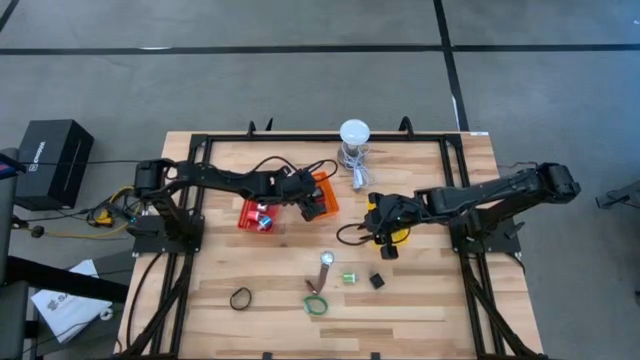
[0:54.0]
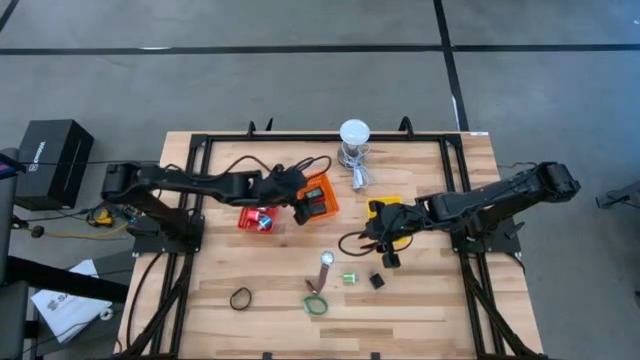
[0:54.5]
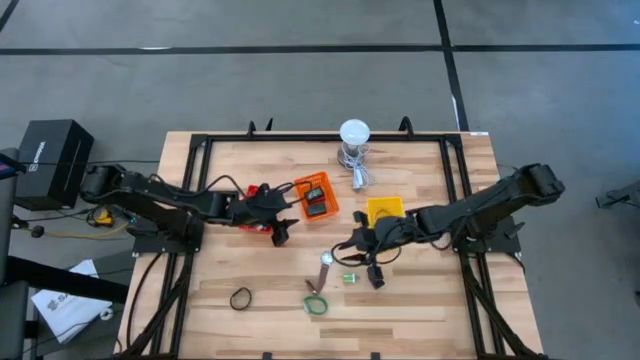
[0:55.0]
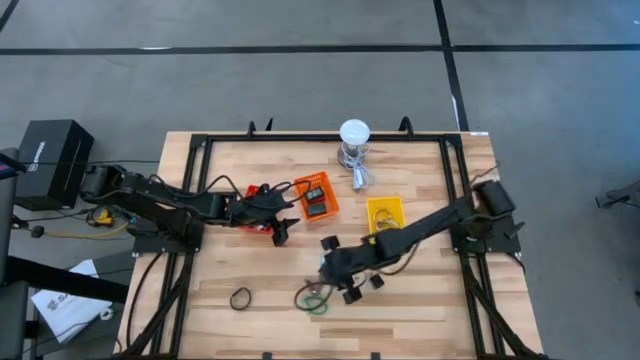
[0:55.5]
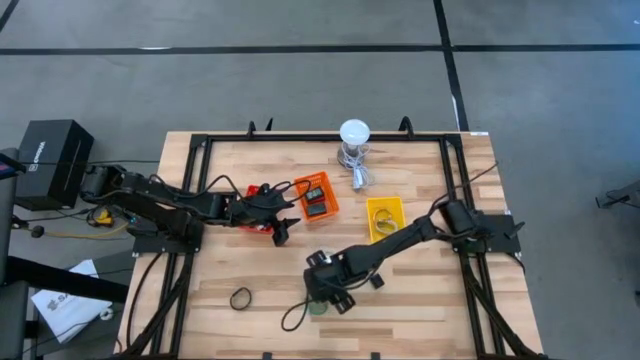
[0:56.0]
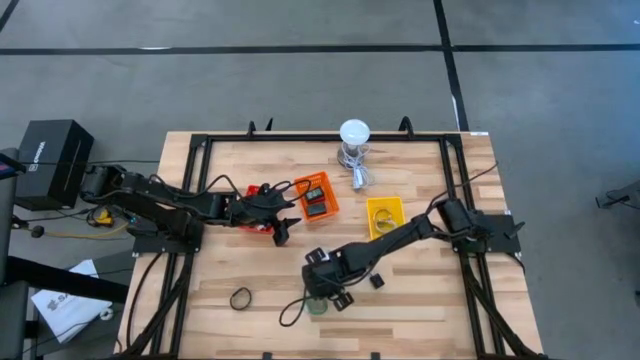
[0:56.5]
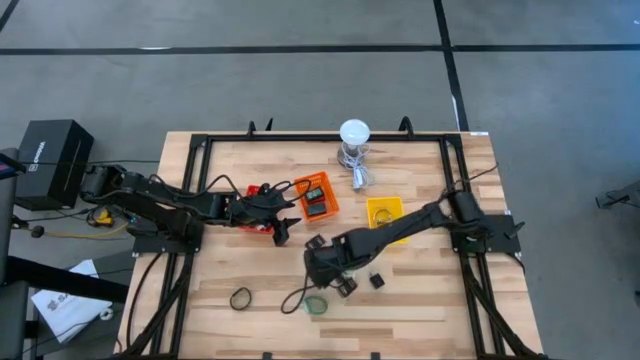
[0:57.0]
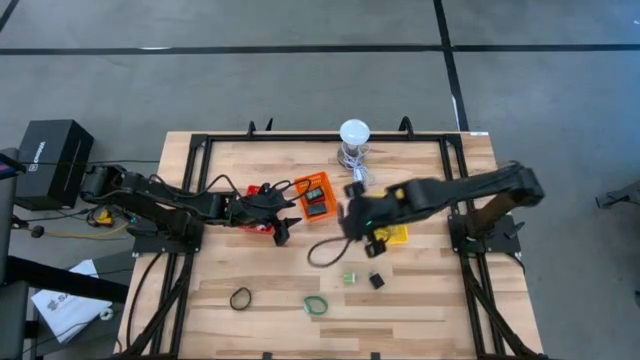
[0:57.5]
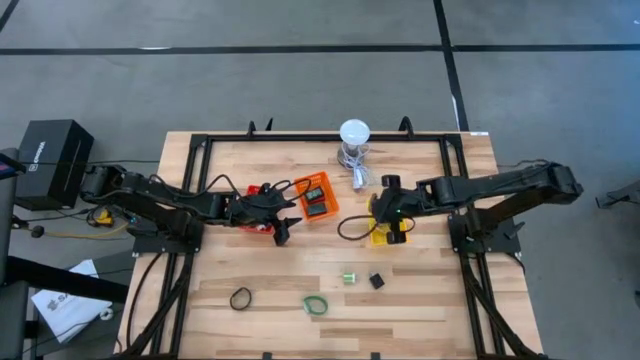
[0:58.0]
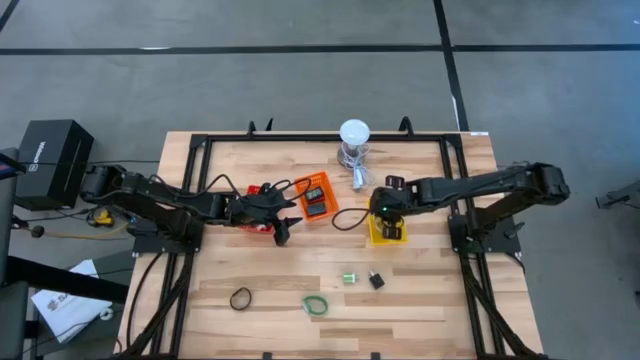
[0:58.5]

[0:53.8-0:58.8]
Task: Pick & Place Office items
Put the brown wrist watch into the yellow bin

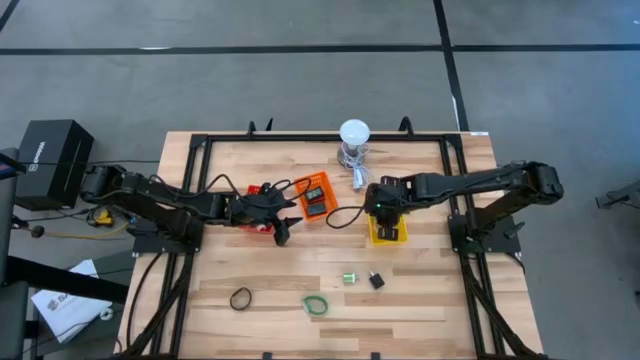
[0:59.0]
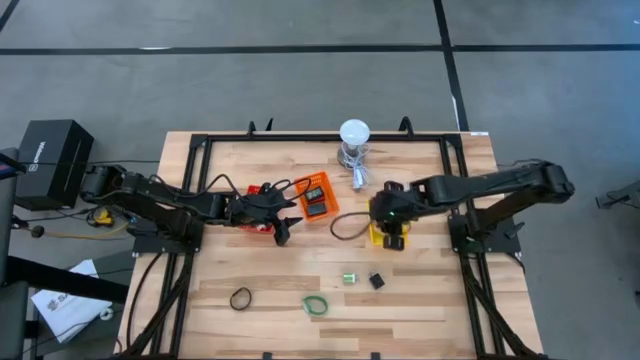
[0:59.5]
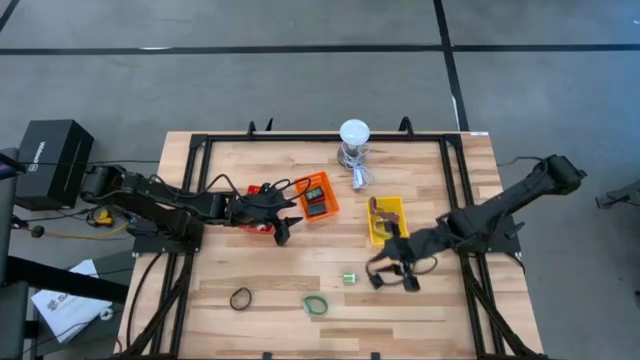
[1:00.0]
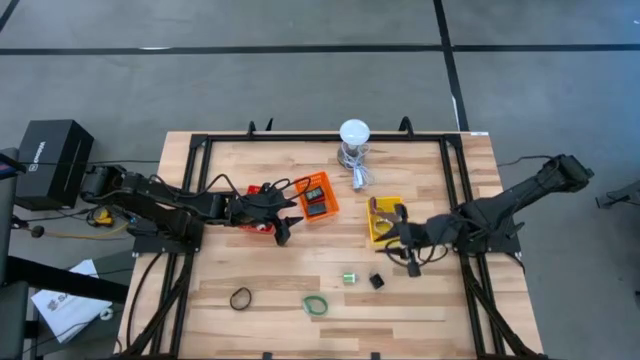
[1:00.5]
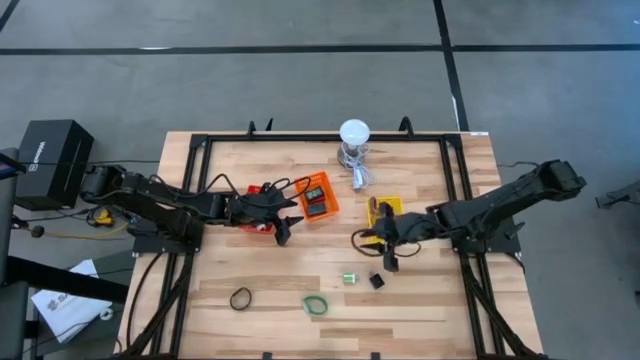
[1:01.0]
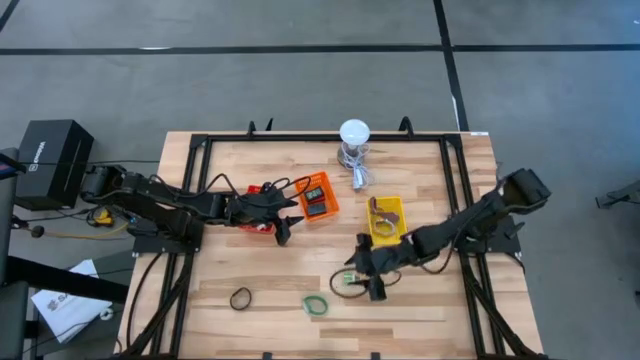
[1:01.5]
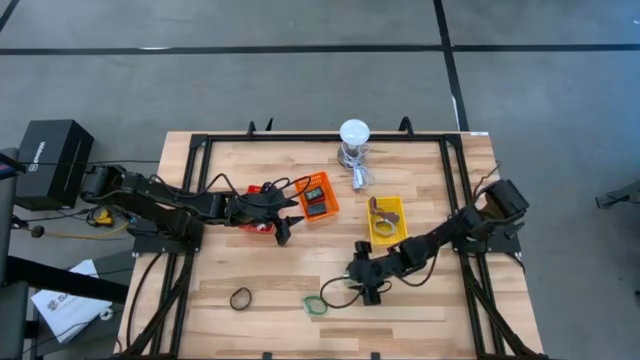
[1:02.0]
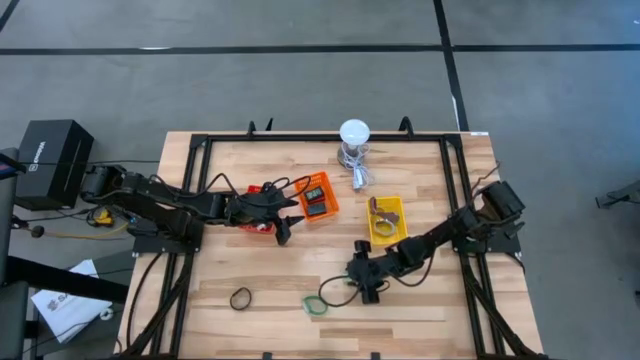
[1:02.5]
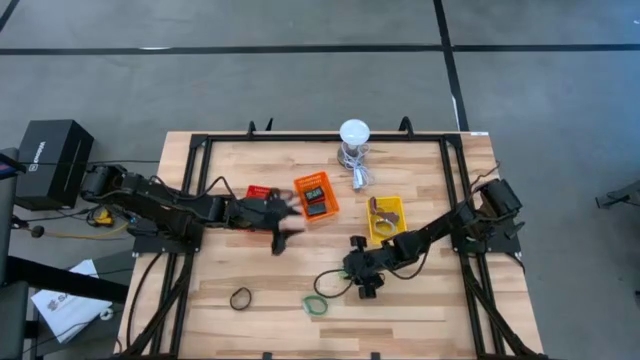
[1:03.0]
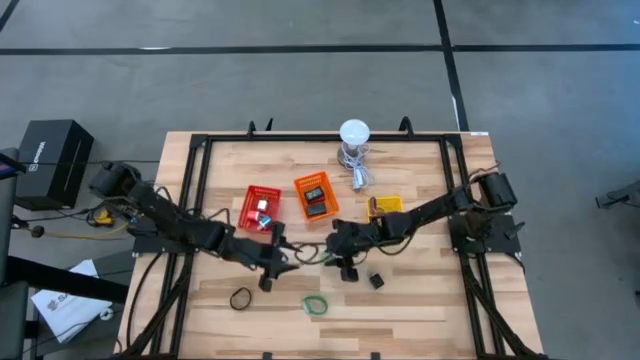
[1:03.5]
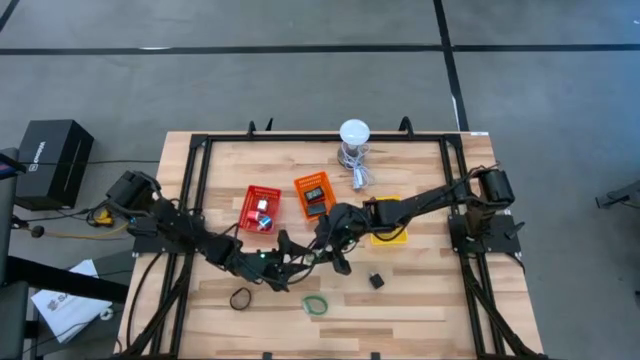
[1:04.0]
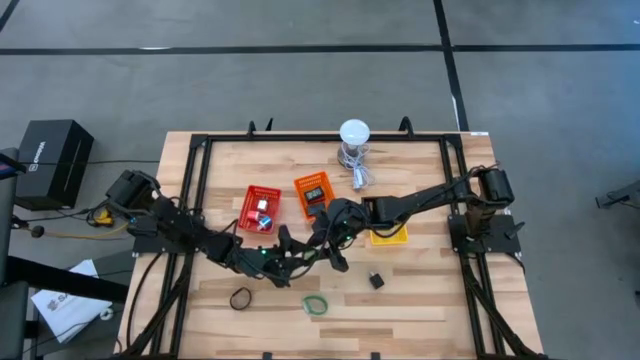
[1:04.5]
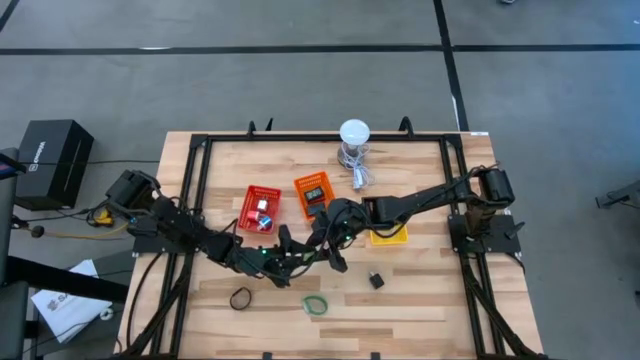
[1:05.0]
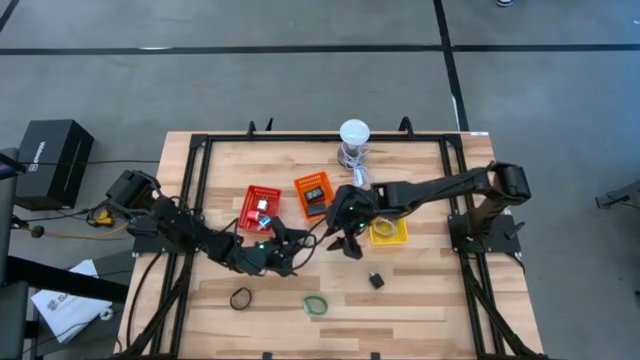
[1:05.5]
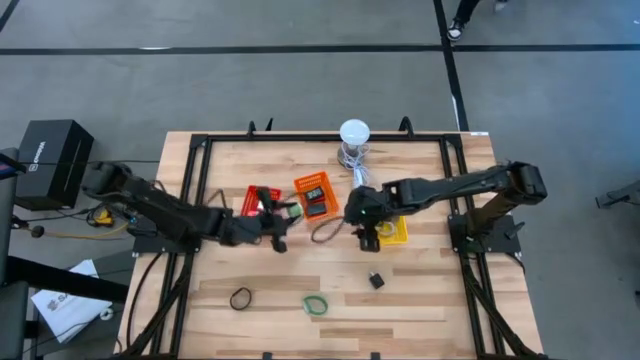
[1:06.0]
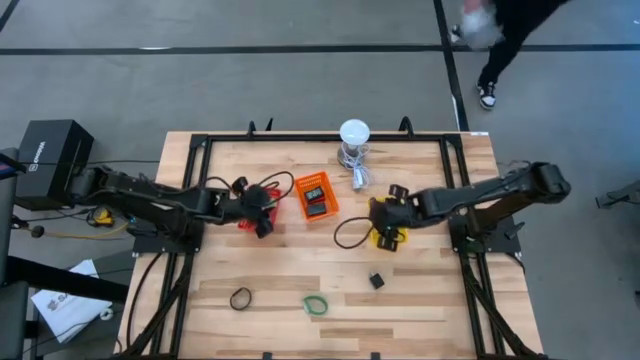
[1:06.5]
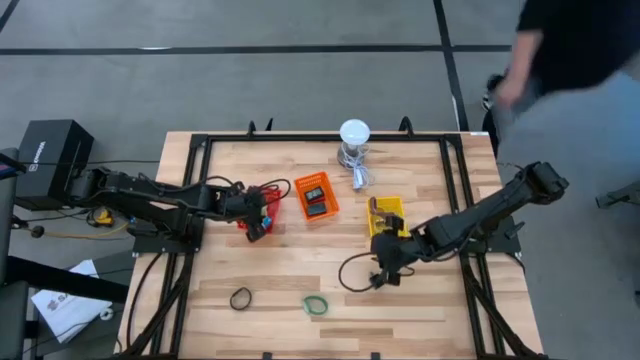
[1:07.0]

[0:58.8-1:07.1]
Put the green charger adapter into the red bin

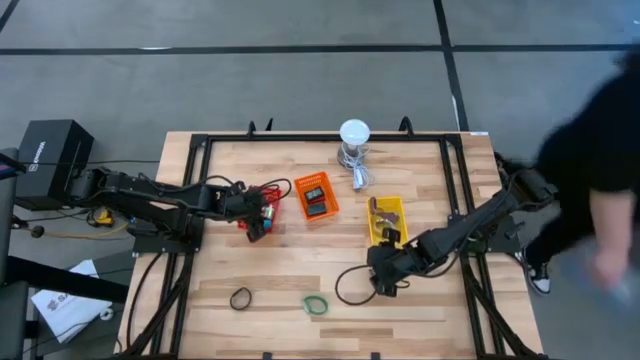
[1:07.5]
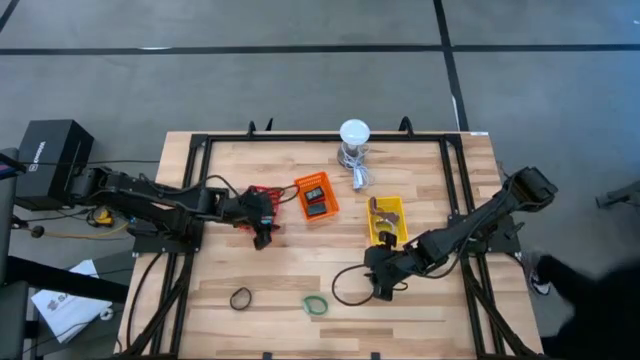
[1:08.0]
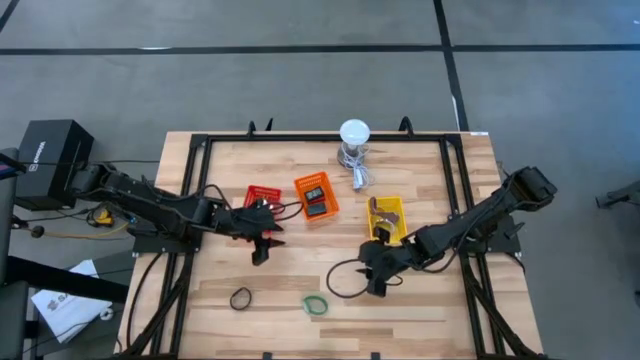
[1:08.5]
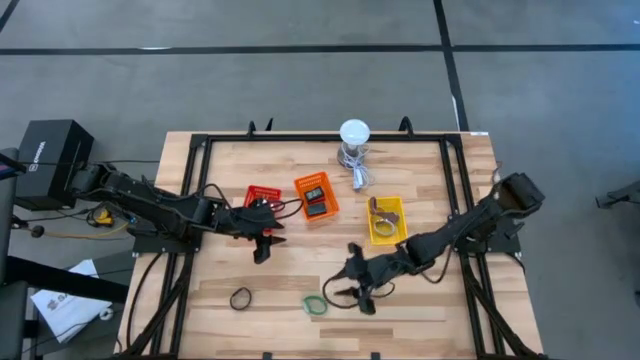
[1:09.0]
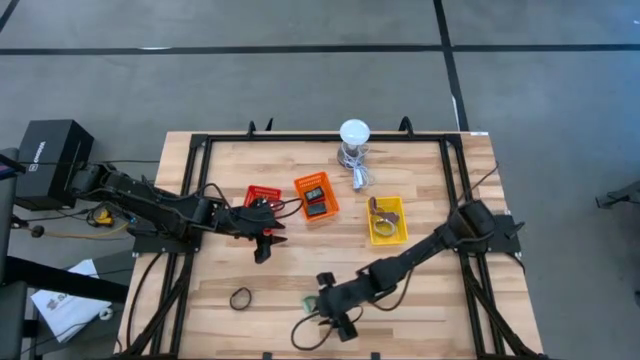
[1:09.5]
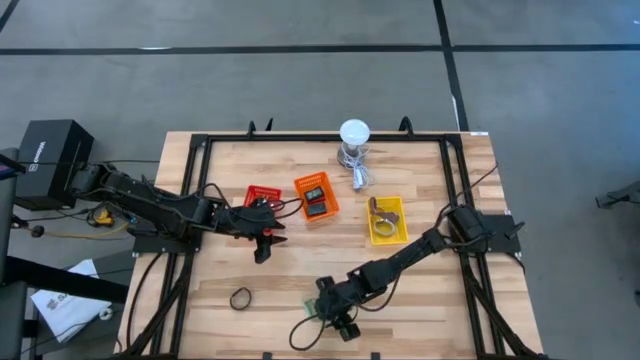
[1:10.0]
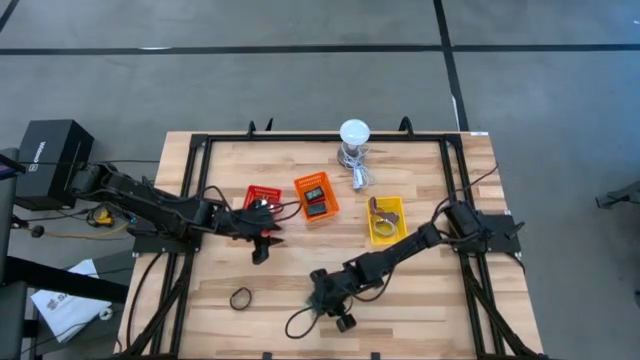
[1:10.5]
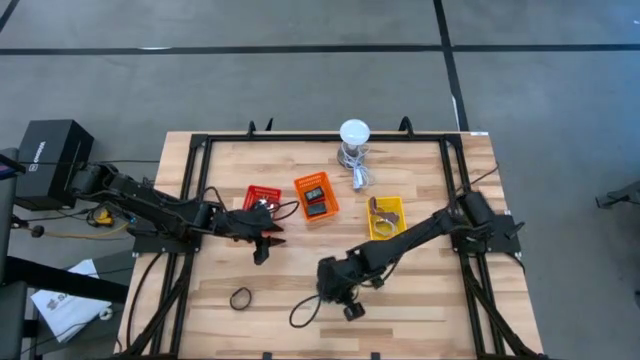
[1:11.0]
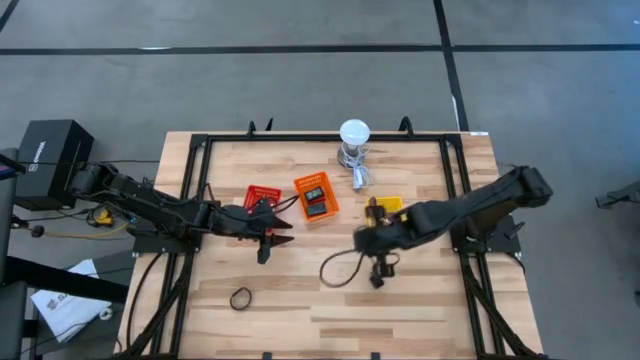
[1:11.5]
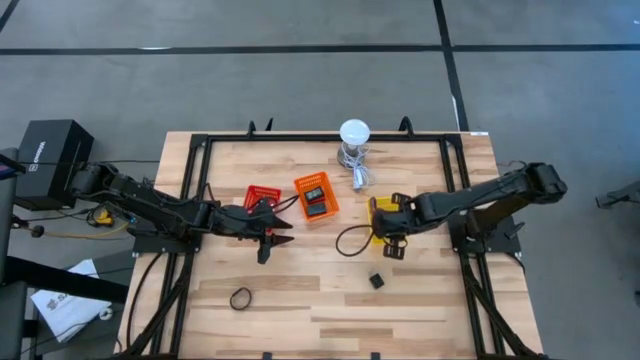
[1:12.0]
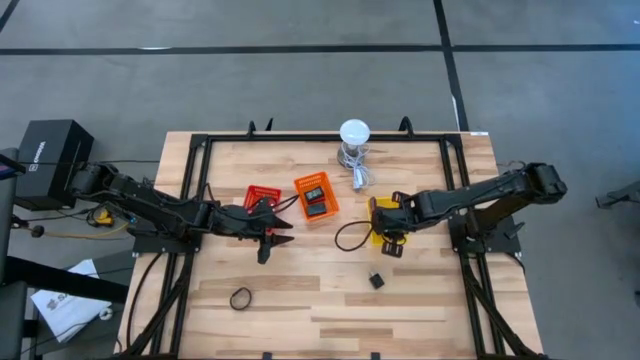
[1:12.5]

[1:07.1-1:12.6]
Put the green wrist watch into the yellow bin

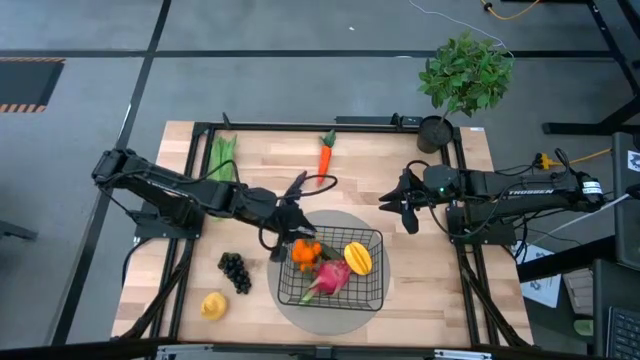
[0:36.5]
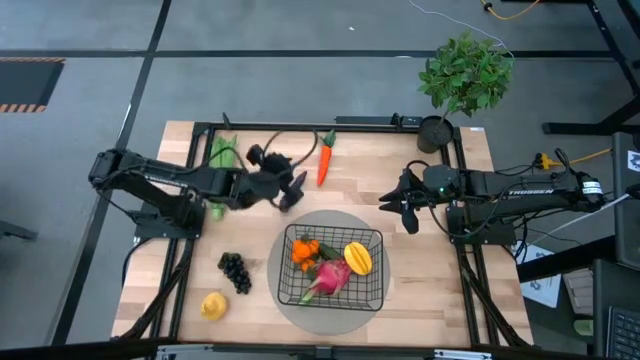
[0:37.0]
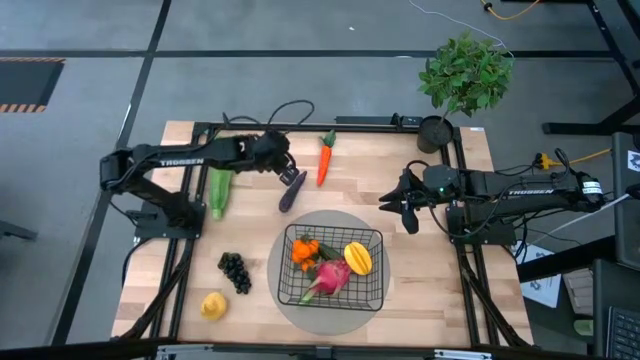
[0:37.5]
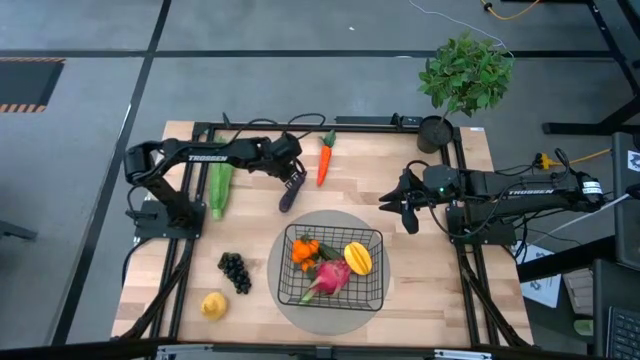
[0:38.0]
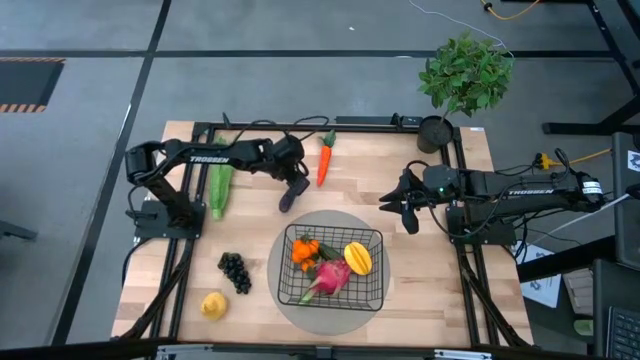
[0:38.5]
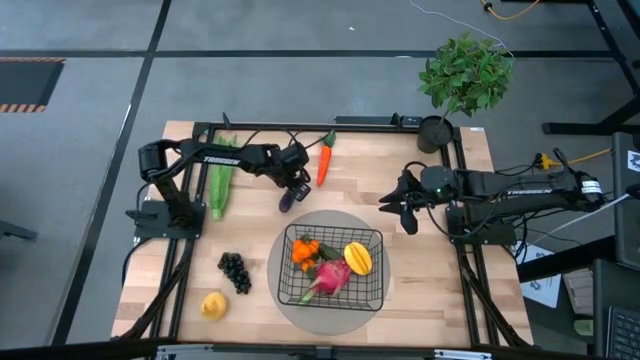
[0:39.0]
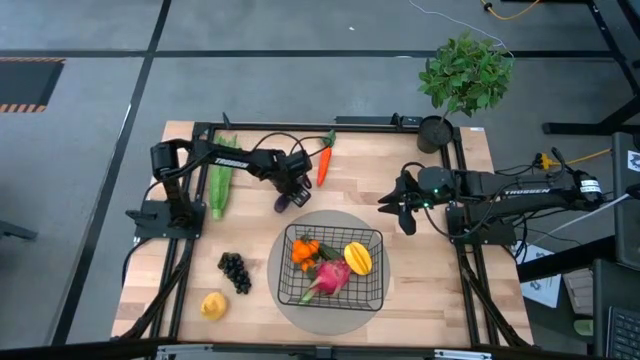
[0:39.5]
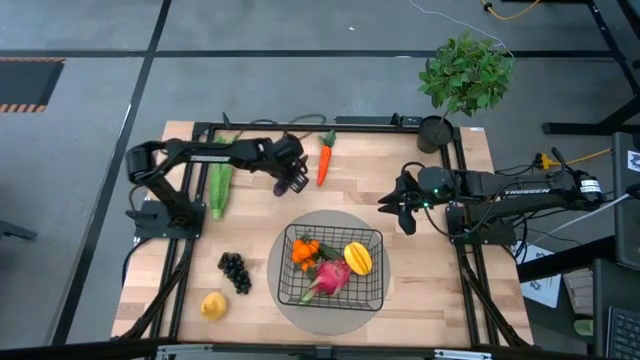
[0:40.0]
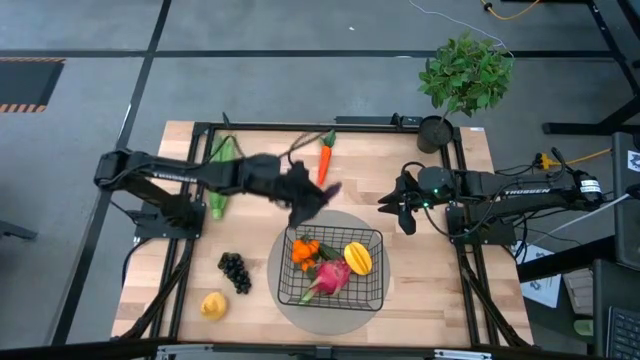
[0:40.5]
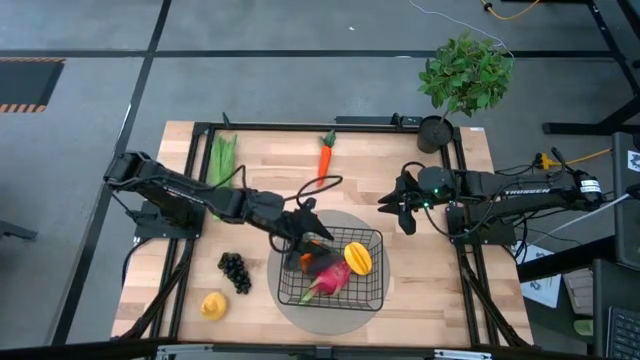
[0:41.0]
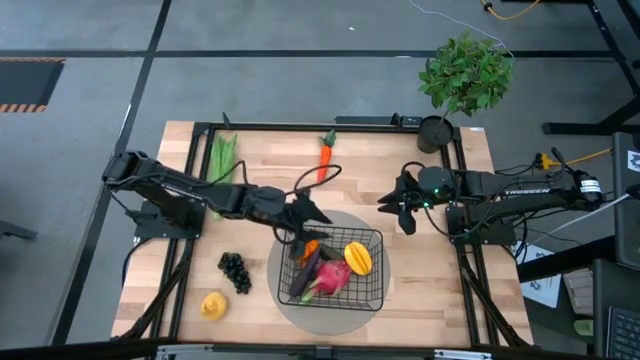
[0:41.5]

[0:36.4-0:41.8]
Task: Build produce basket
Put the purple eggplant into the black wire basket
